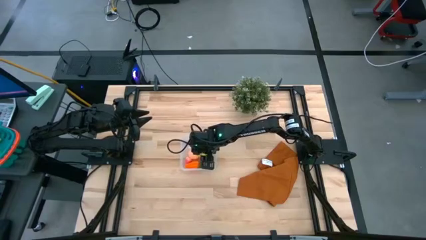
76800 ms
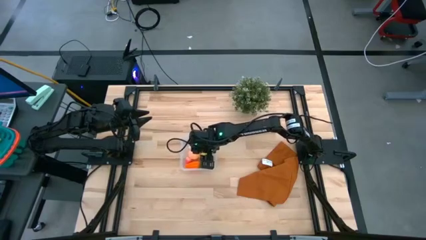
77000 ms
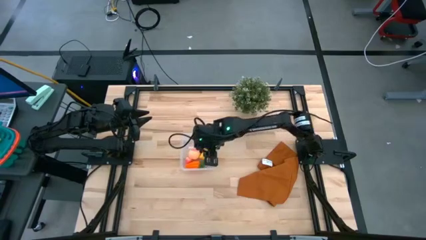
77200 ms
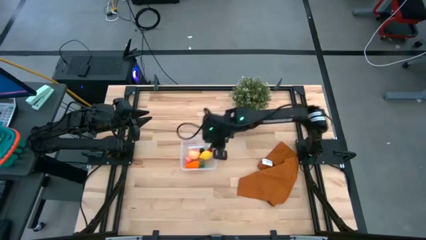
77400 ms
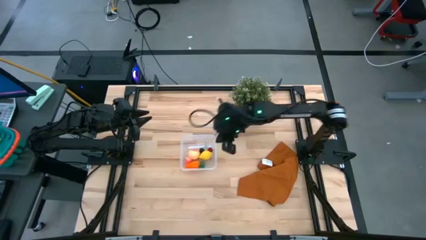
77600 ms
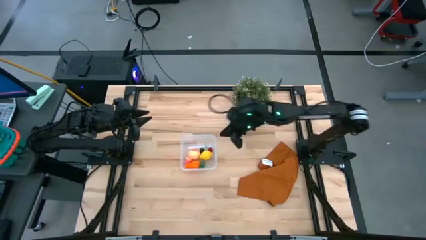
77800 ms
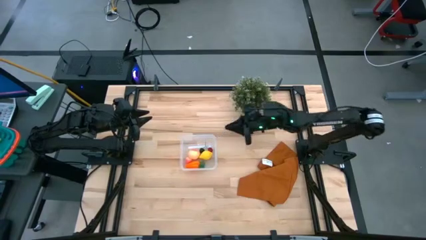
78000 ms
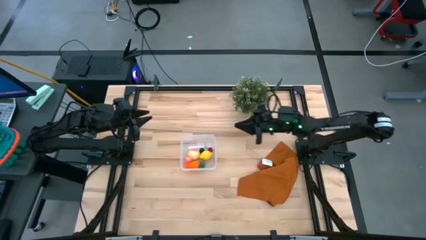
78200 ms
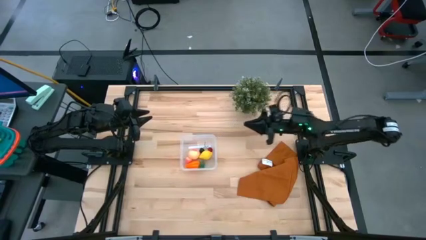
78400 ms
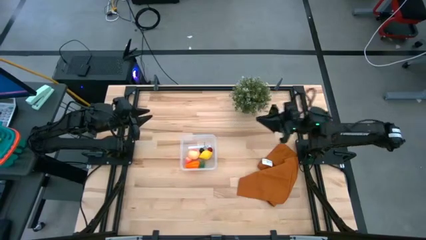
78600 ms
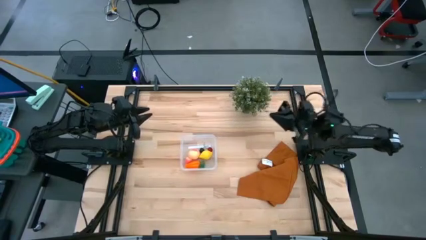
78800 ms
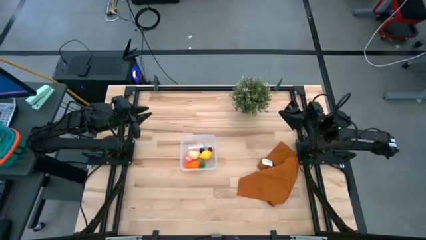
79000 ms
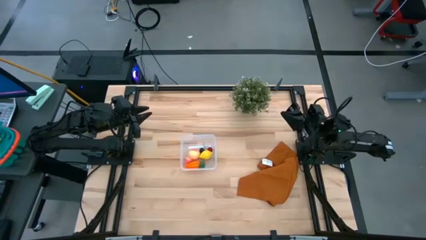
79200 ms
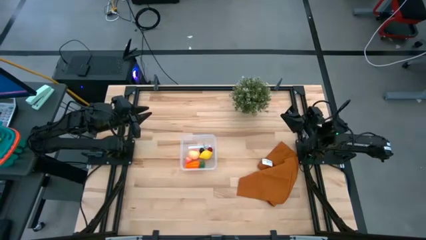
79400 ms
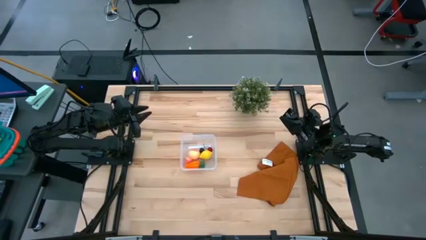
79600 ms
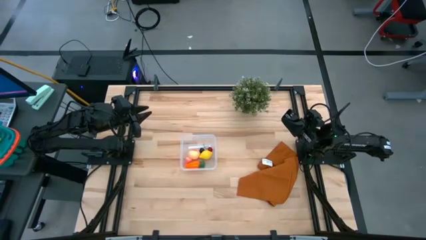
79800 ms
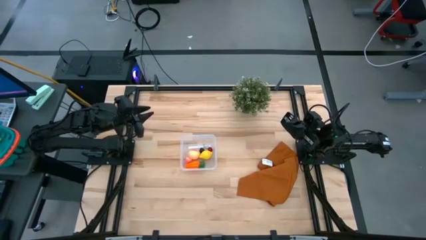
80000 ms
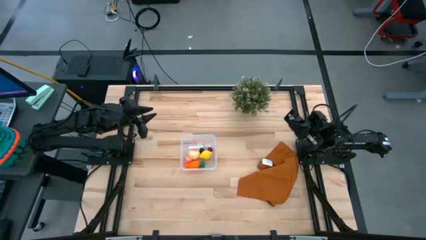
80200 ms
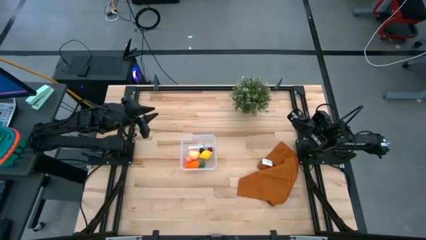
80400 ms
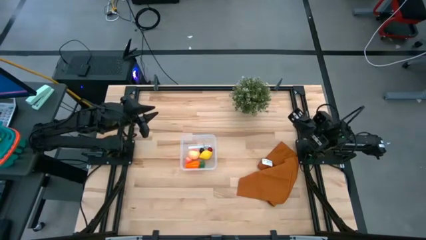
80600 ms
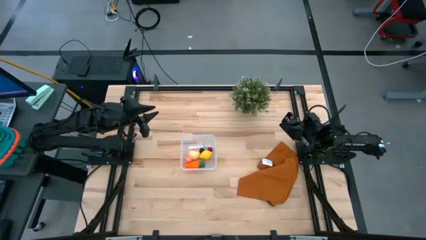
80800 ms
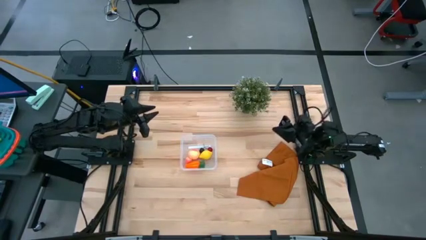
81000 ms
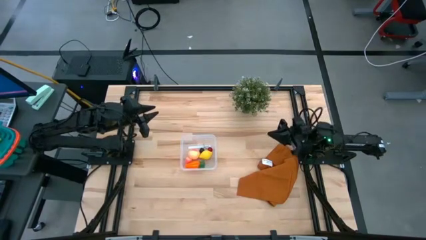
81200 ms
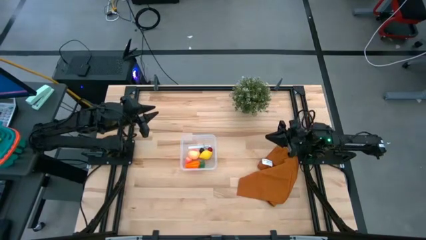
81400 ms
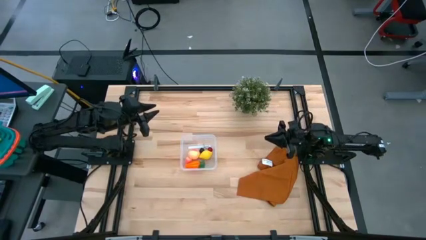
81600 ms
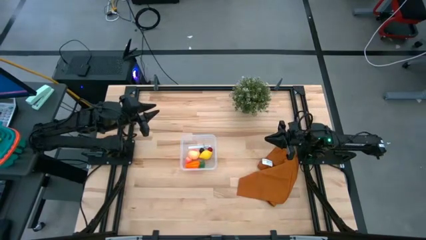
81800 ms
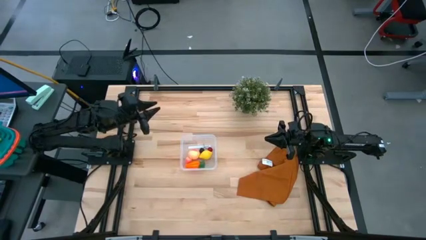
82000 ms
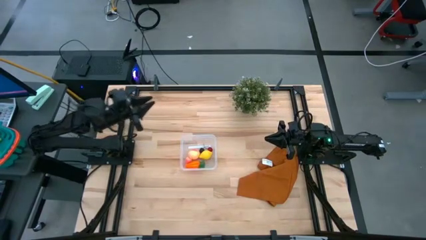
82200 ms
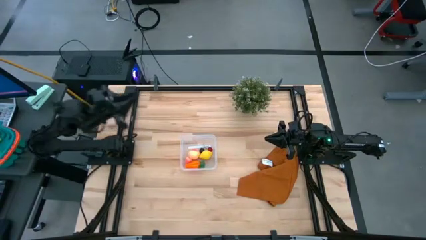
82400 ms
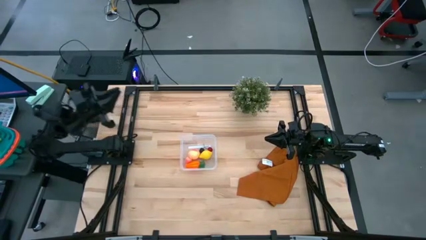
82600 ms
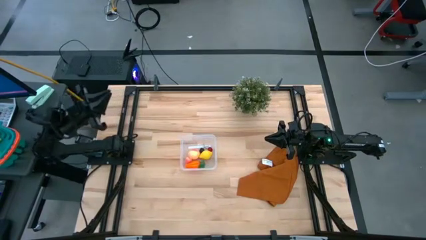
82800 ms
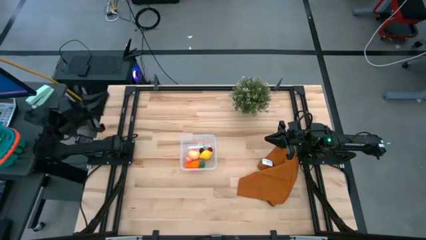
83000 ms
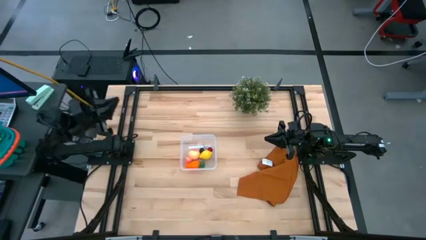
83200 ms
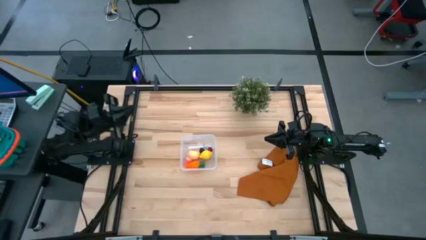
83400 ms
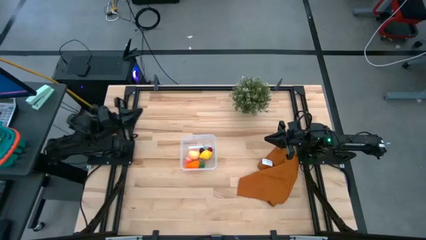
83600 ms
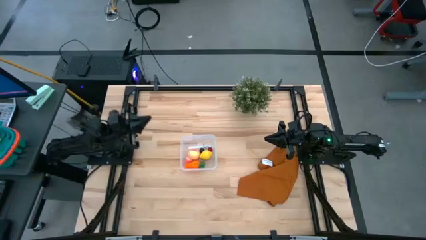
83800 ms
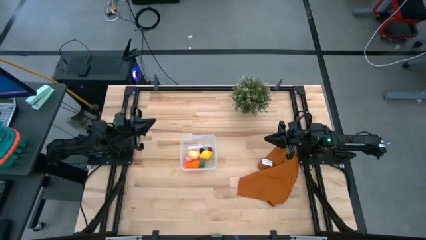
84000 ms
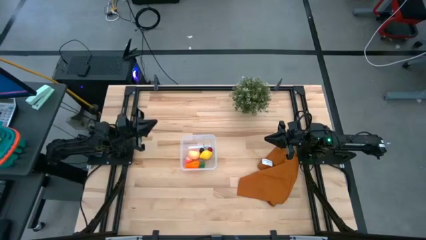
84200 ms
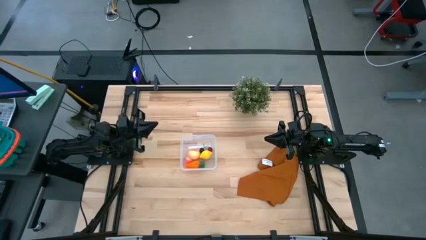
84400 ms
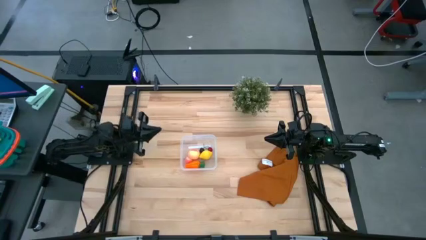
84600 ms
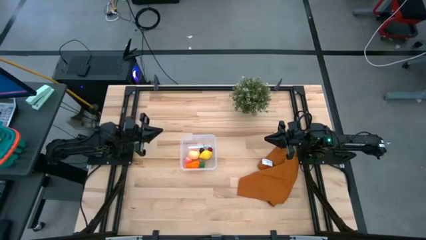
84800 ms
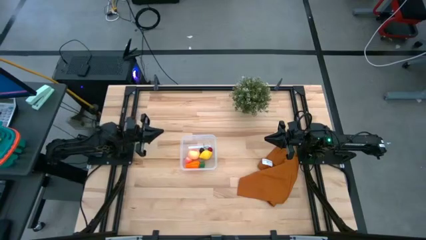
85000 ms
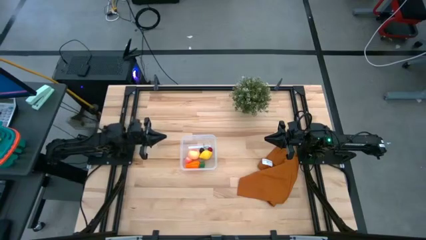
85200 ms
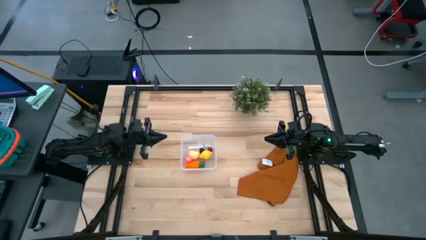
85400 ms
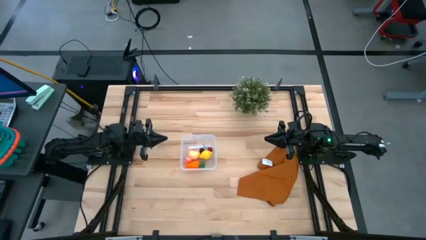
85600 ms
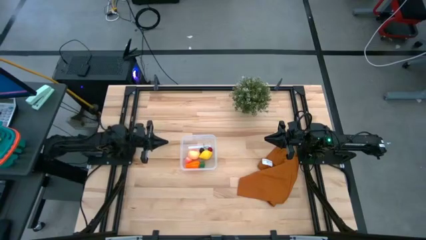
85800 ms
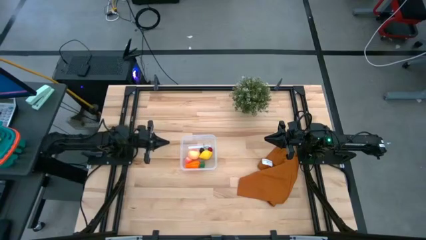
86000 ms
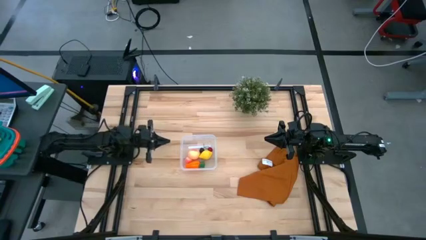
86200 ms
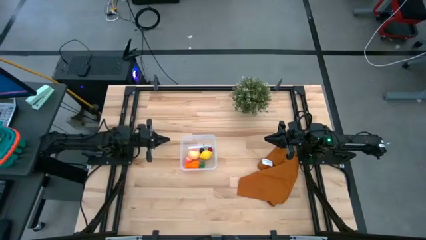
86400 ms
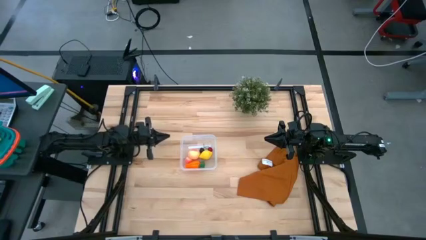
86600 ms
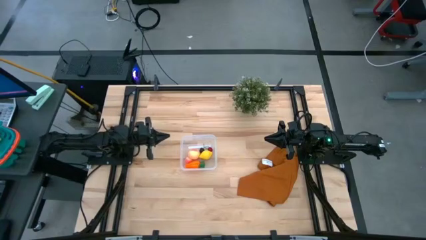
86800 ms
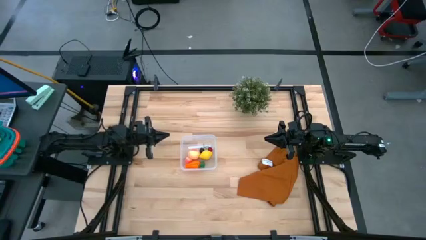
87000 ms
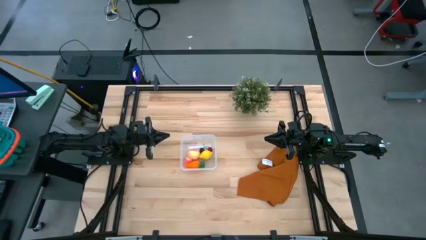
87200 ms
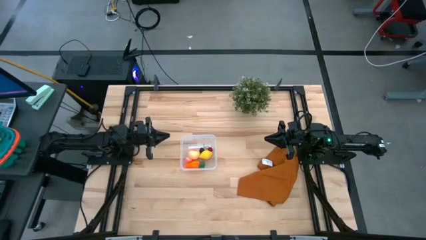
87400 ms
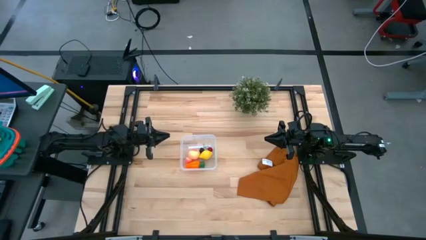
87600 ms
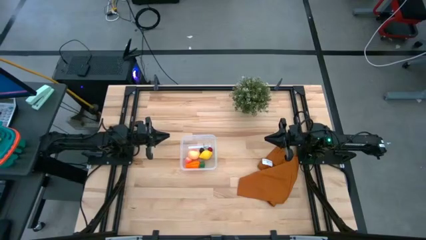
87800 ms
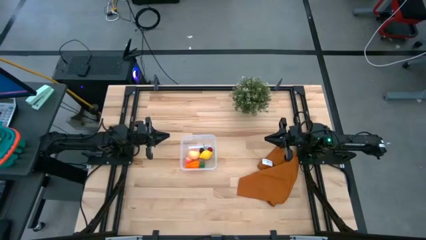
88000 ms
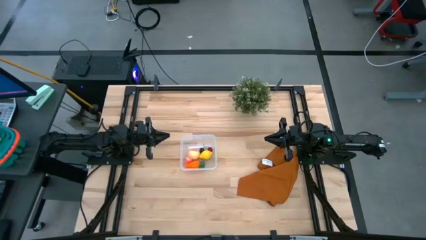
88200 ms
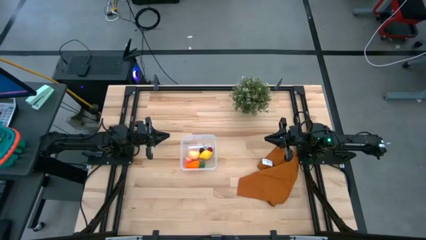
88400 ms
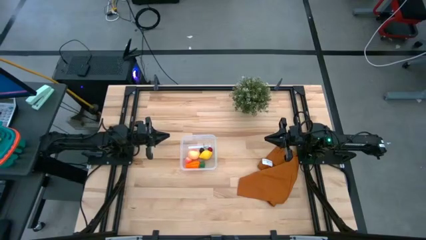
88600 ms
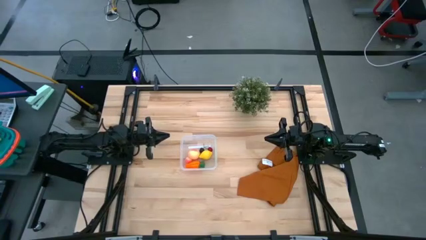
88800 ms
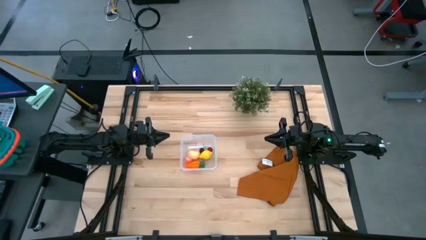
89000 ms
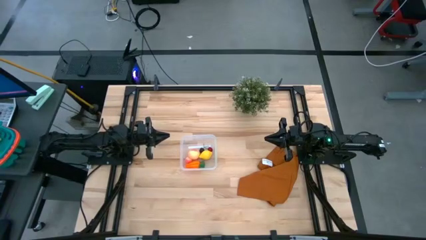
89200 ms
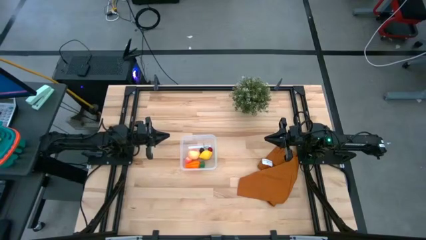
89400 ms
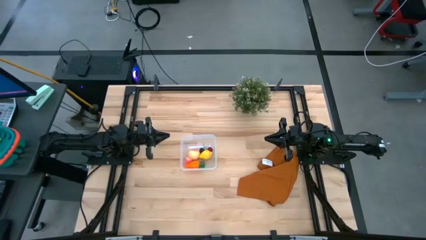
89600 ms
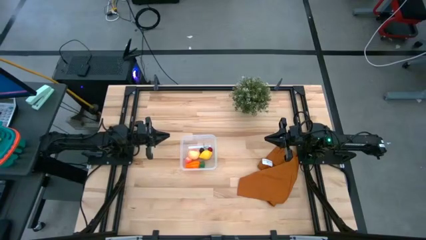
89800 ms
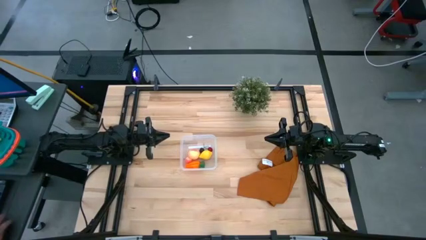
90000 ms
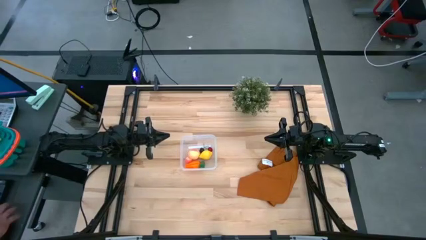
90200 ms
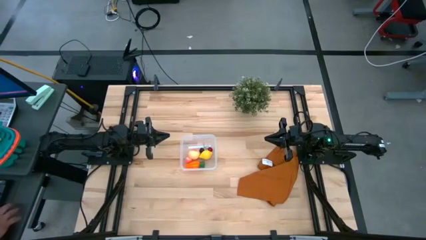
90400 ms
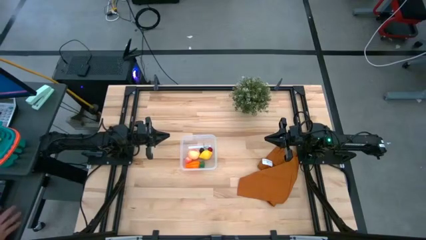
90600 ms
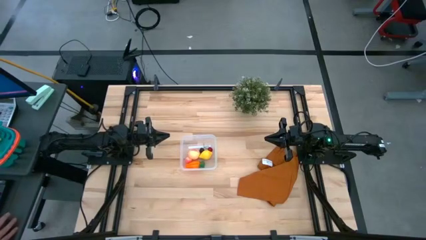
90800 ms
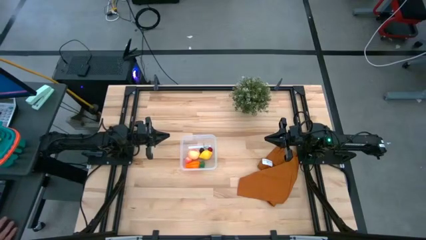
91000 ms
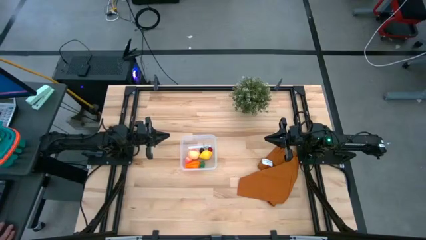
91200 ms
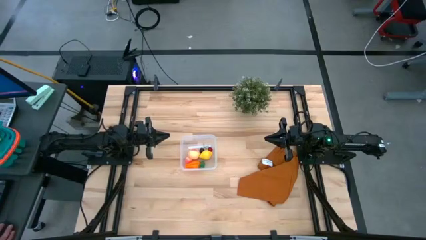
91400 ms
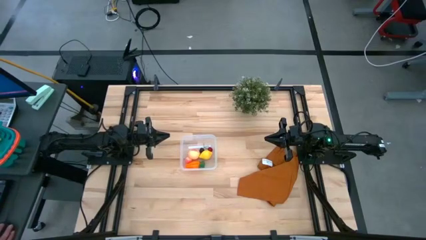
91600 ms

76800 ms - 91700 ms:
Task: Pick and placing Produce into tupperware
Return to Home Position
